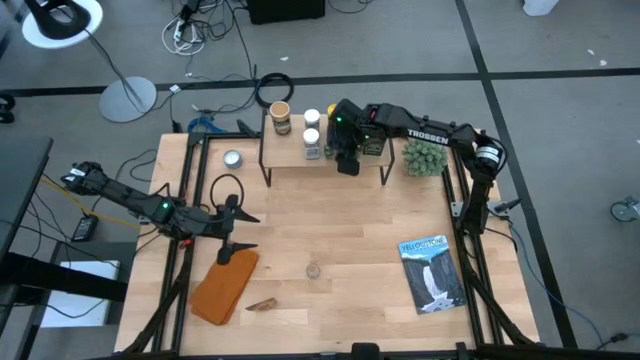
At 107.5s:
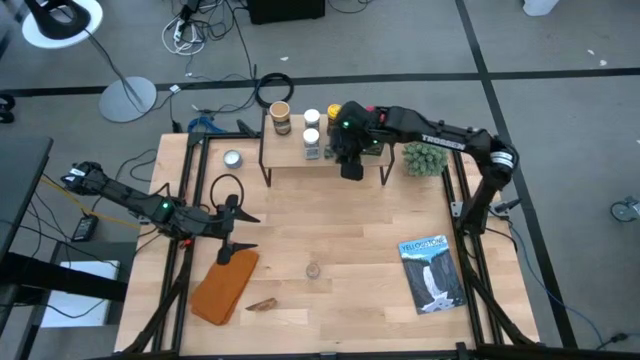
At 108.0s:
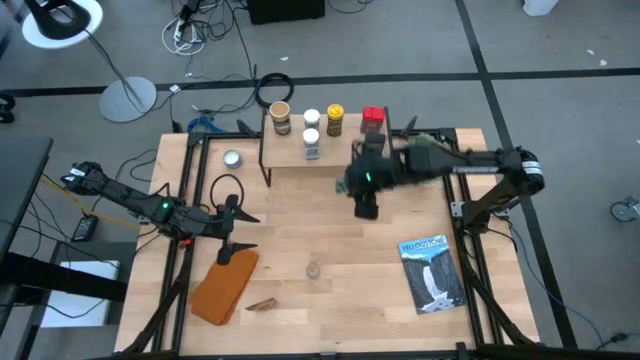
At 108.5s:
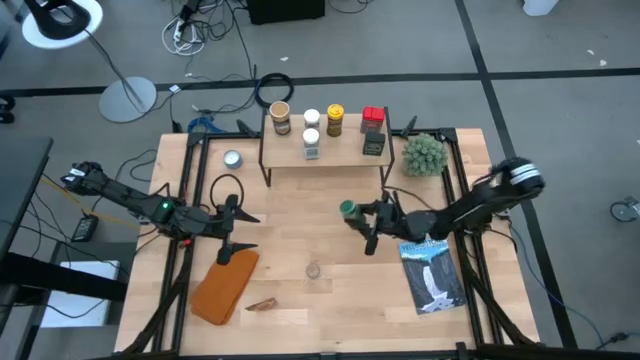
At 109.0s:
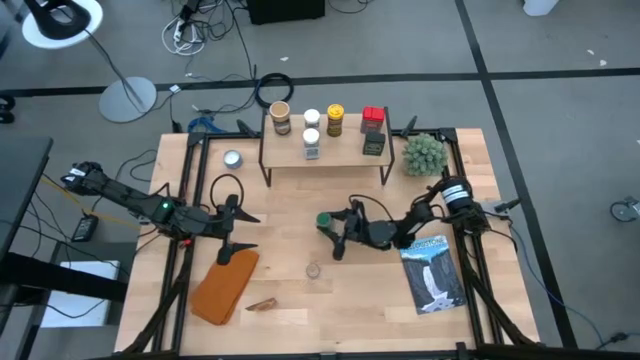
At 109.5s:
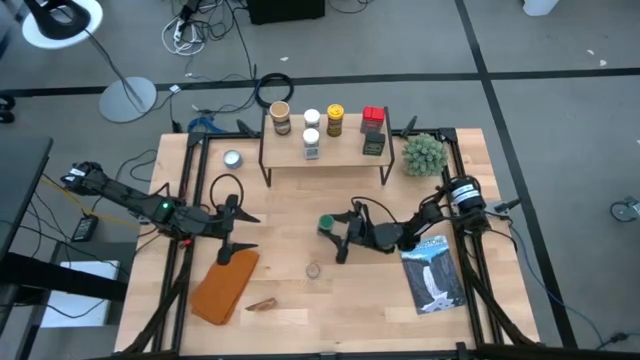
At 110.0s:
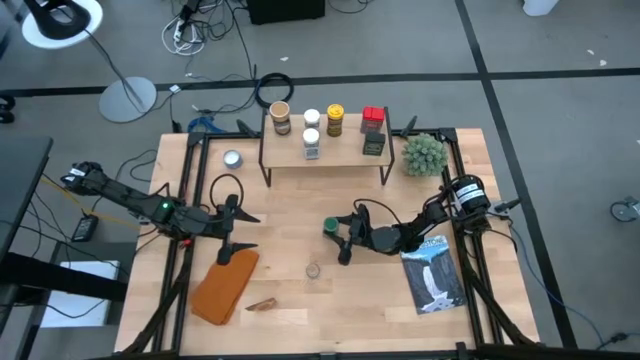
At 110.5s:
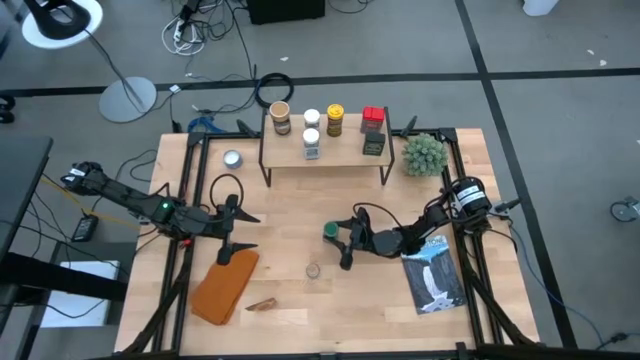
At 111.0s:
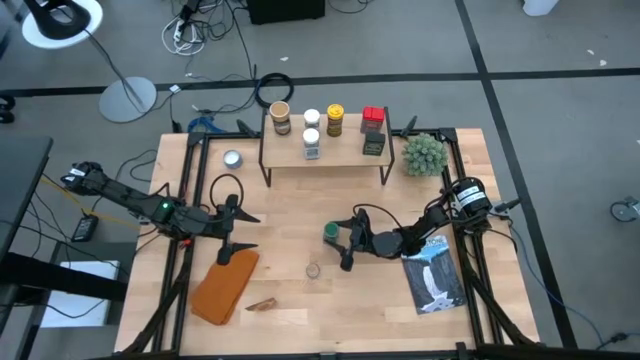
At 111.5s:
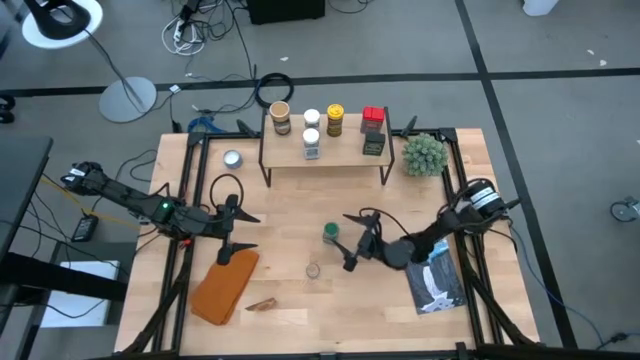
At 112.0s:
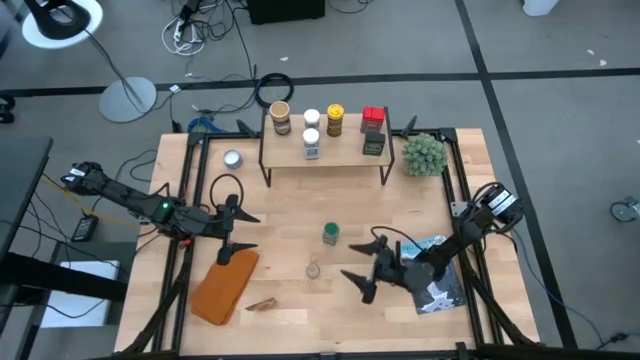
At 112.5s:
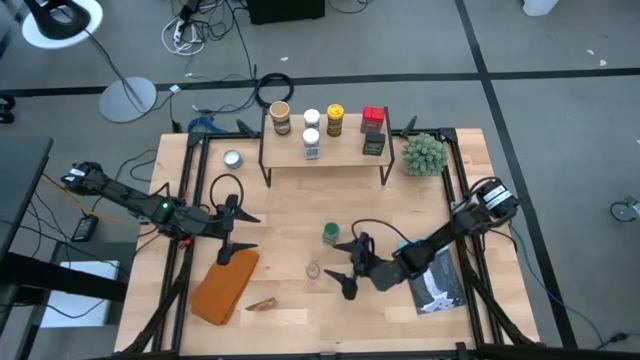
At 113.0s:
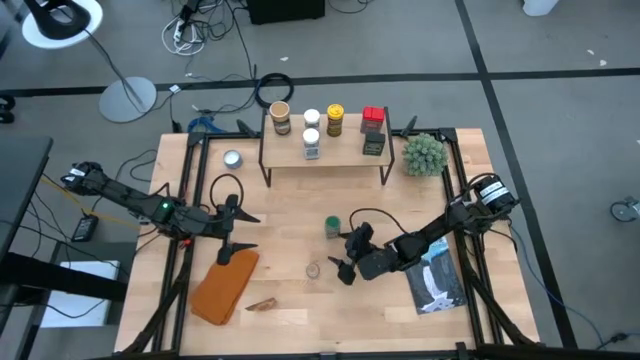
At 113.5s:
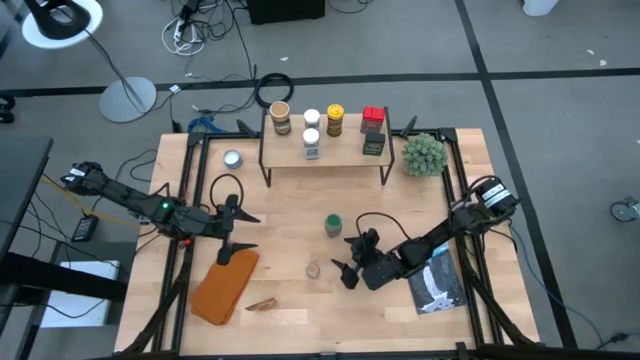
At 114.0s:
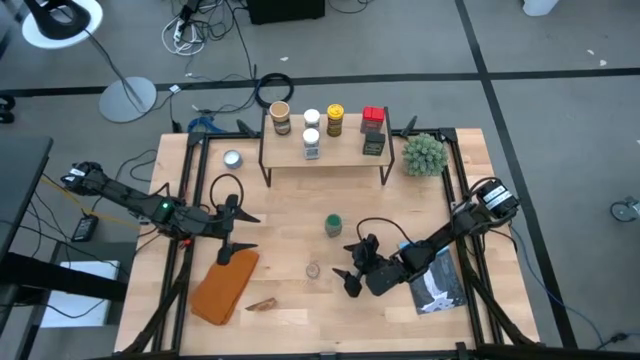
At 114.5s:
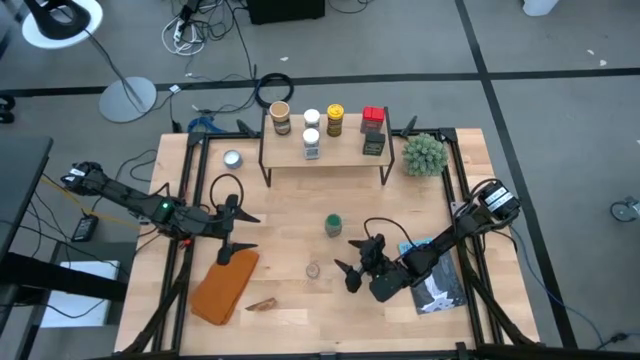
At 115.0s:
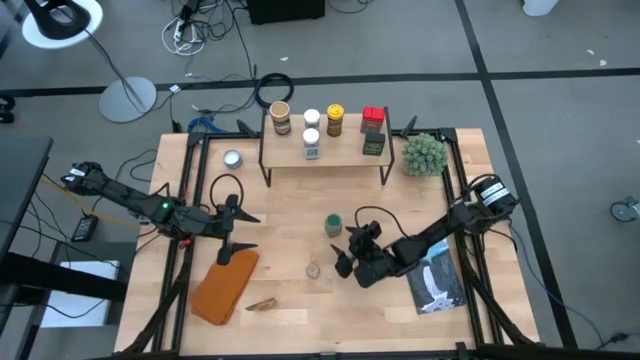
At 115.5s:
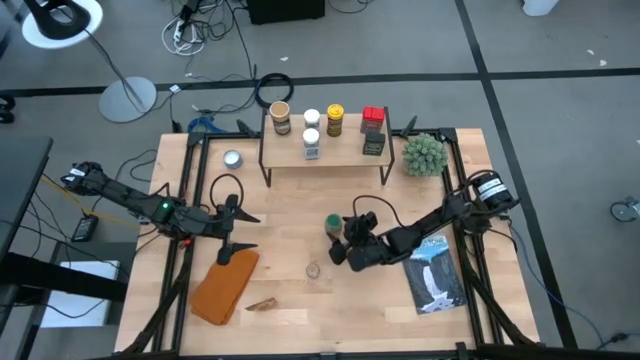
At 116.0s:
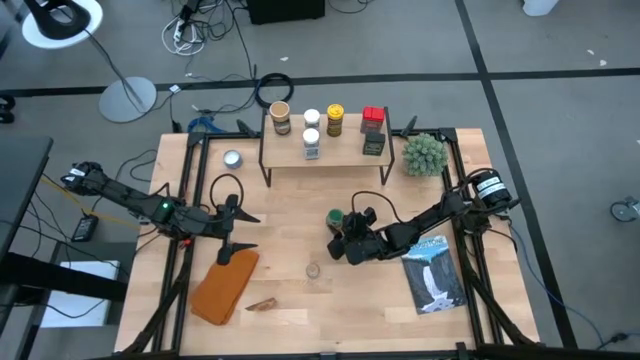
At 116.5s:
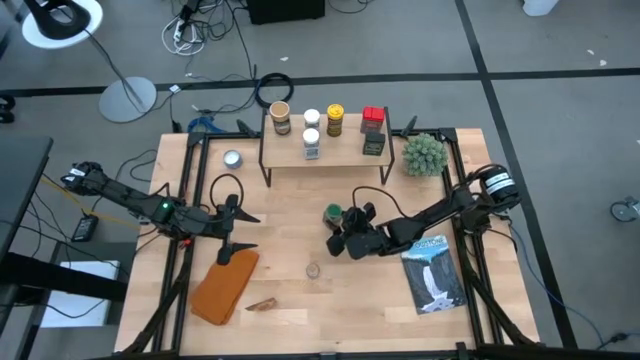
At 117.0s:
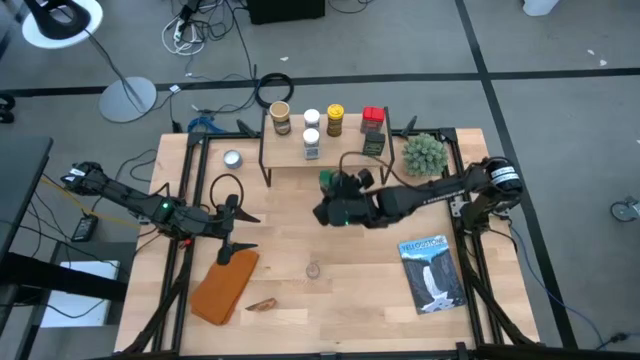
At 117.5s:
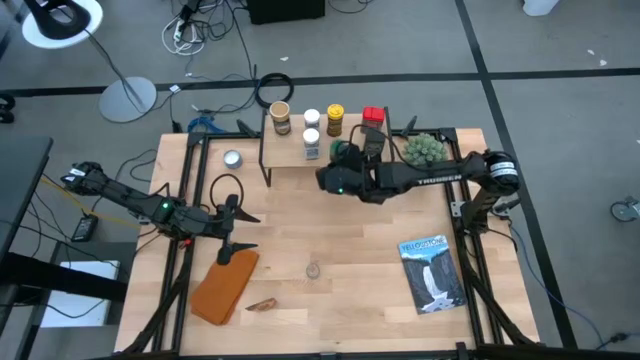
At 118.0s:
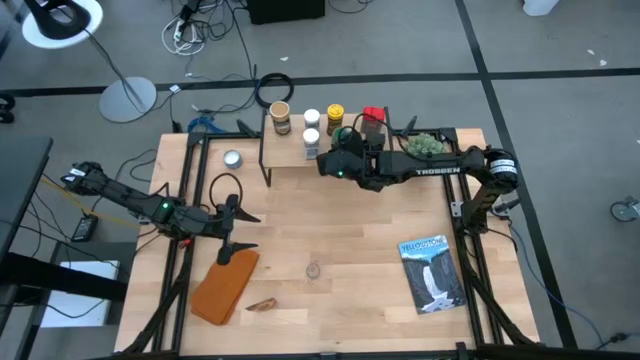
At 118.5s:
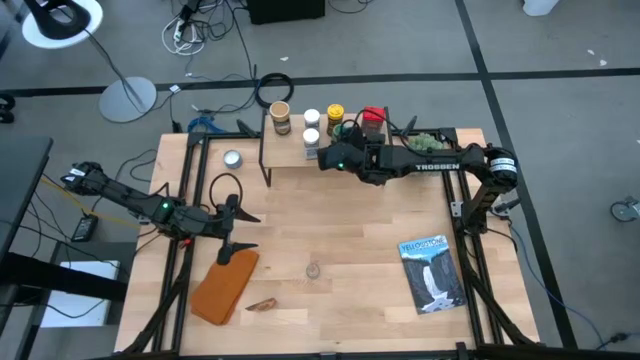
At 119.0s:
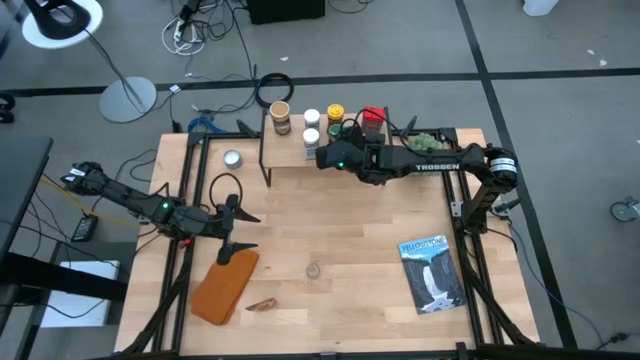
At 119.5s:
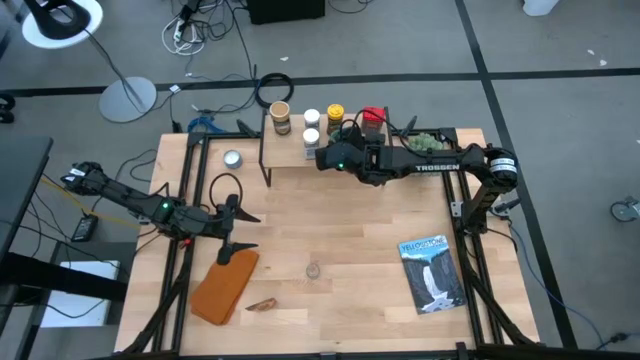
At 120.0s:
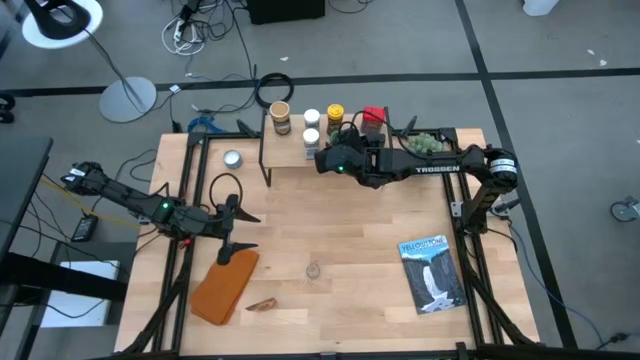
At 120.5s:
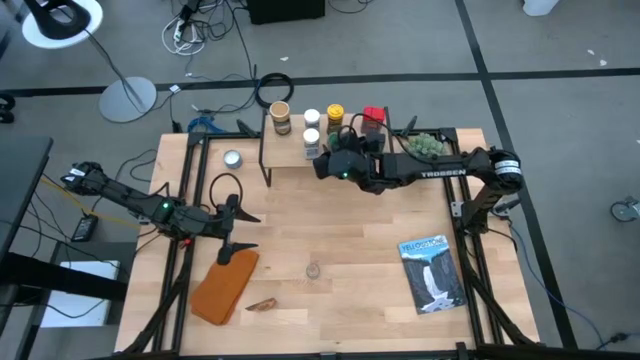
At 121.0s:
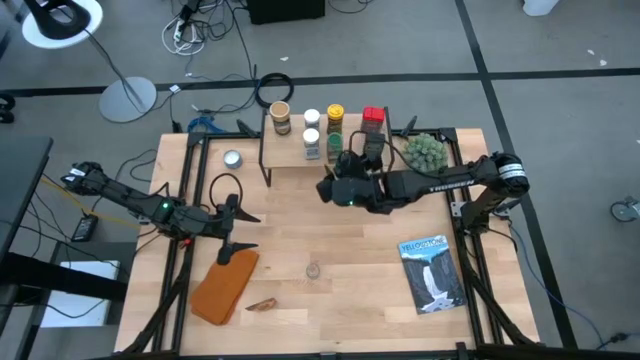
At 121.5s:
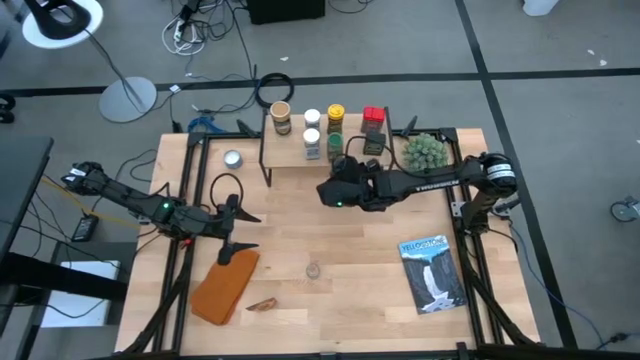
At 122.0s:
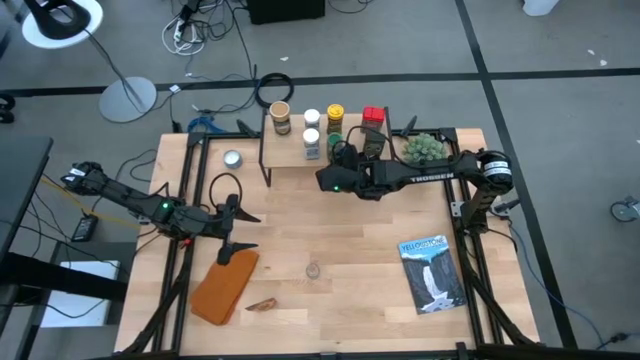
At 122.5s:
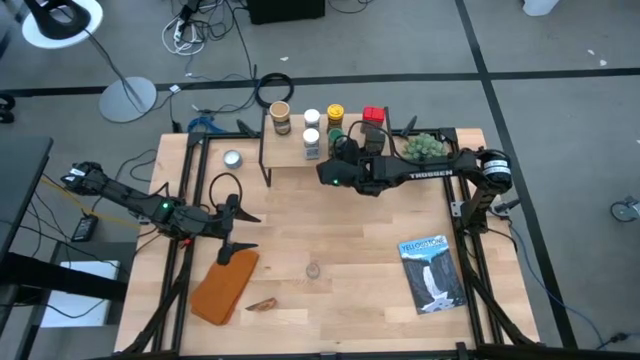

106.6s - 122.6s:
Task: Shelf spices
Put the green seasoning bottle on the shelf

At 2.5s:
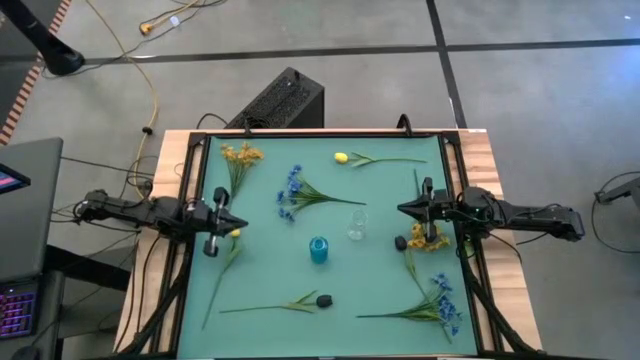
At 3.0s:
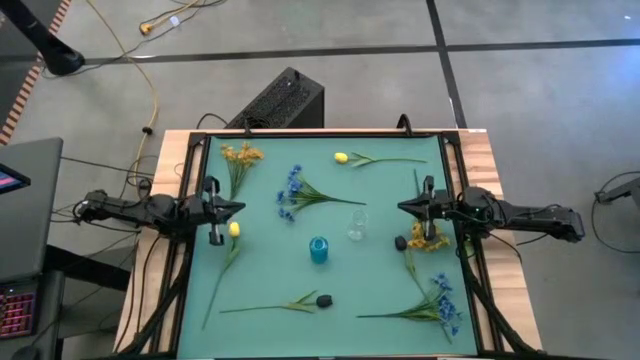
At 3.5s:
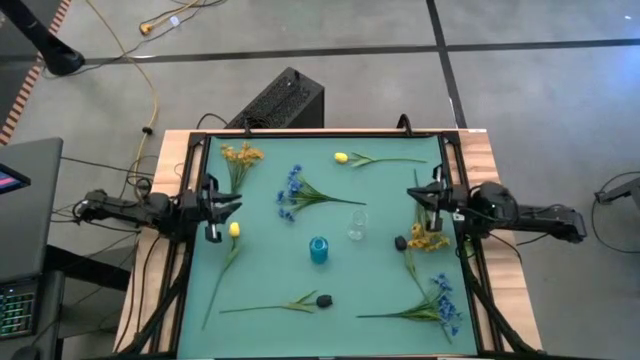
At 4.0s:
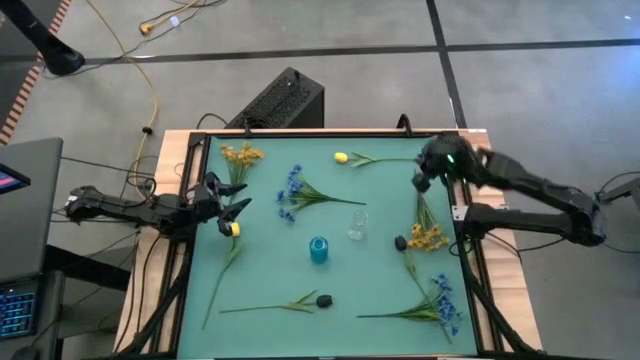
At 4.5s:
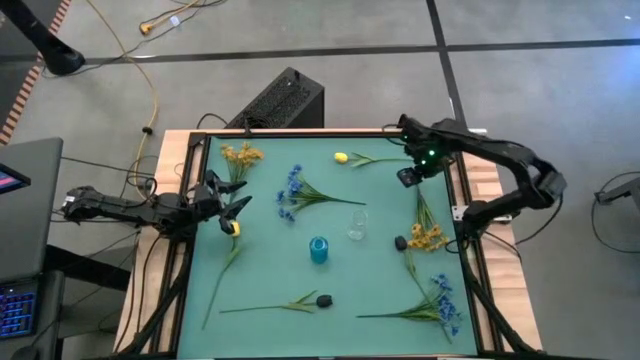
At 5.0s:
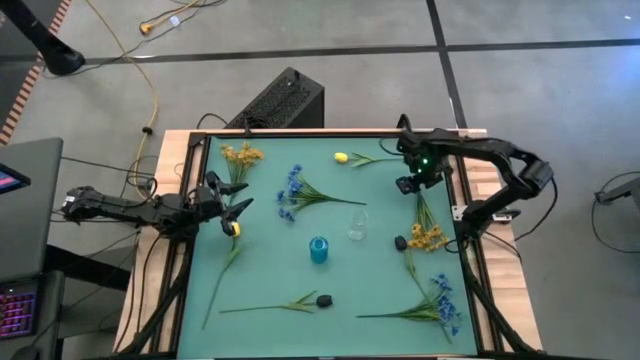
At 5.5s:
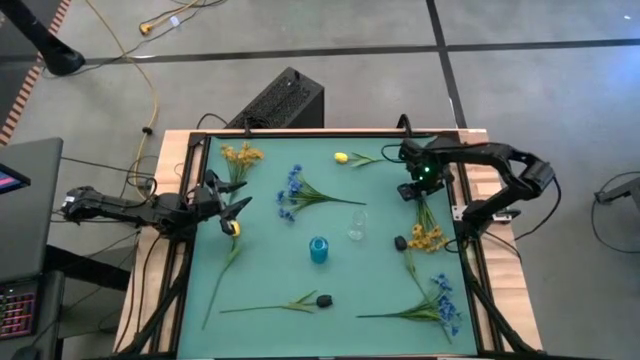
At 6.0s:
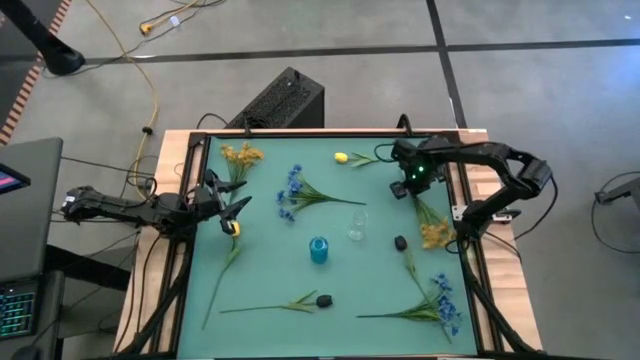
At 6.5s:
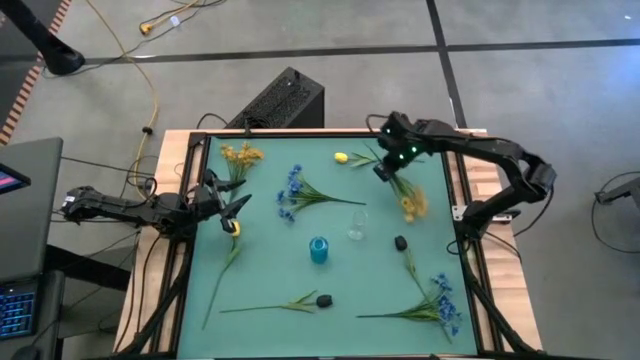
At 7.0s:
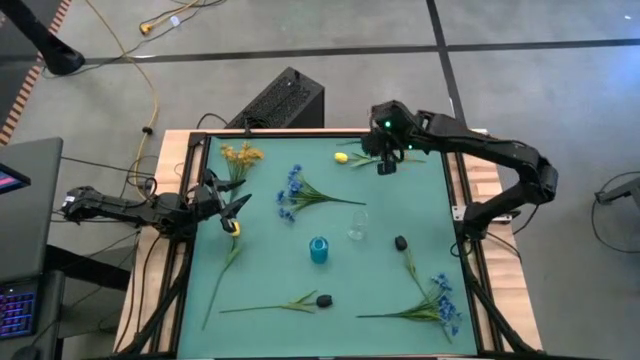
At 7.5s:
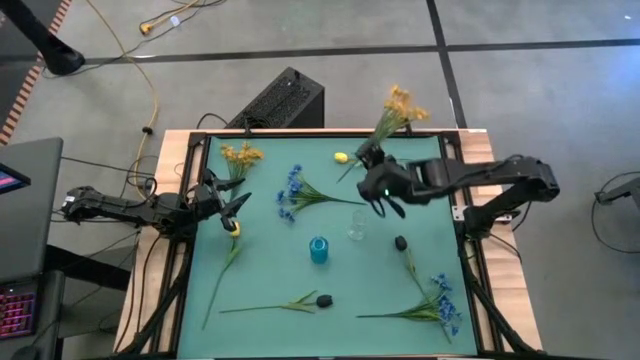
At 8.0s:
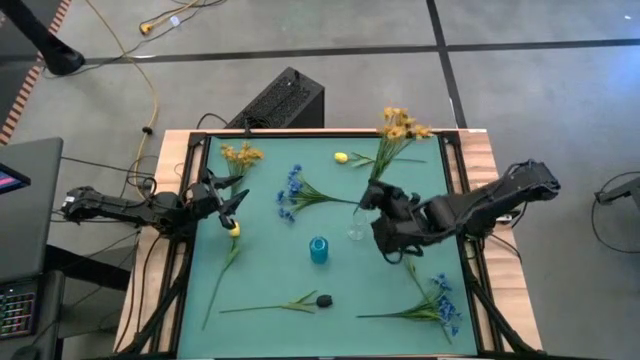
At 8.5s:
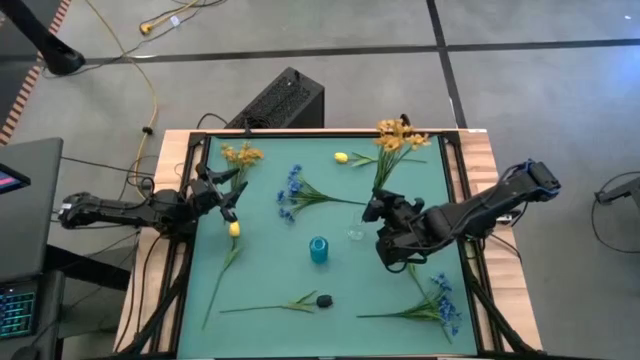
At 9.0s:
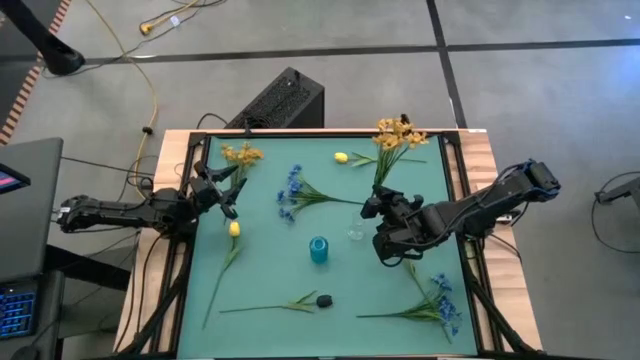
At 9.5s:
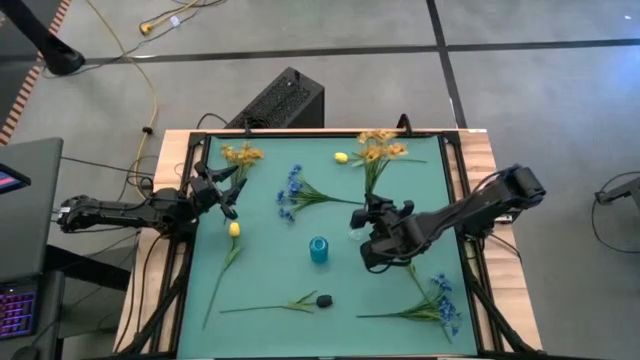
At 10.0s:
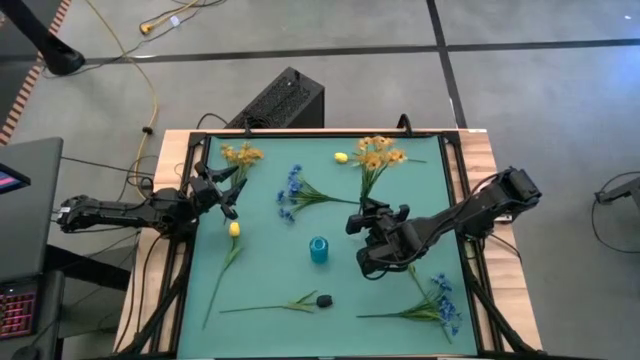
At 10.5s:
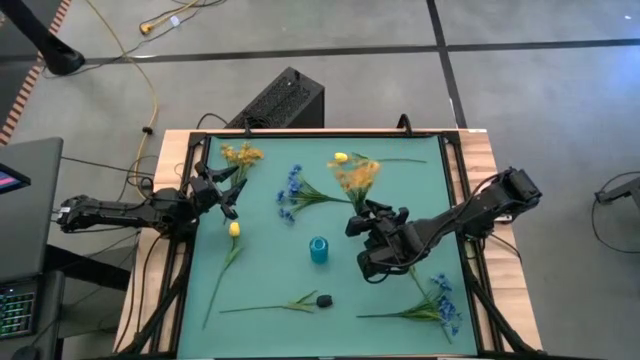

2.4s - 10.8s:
Task: Sort flowers into vase by color
Put the right yellow flower into the transparent vase
